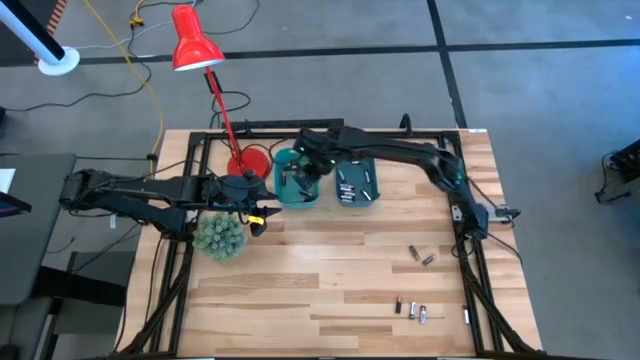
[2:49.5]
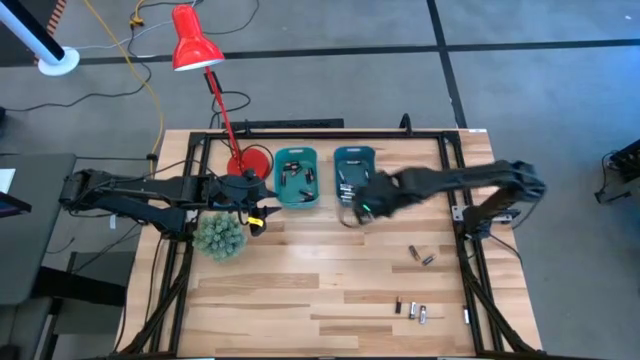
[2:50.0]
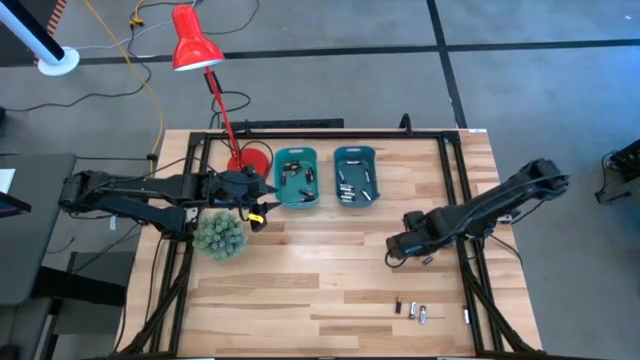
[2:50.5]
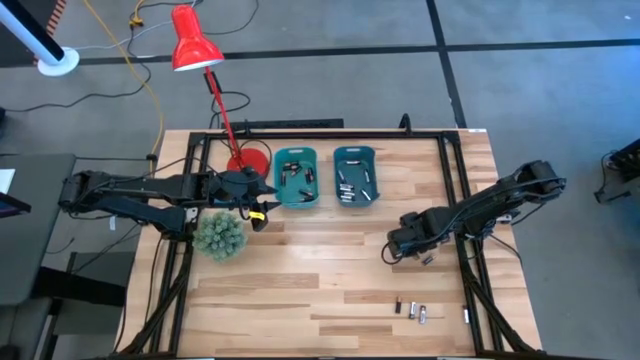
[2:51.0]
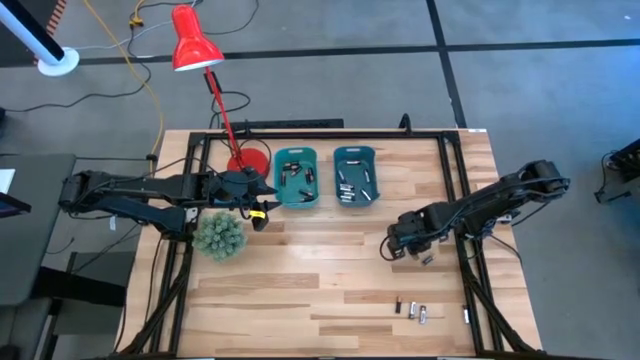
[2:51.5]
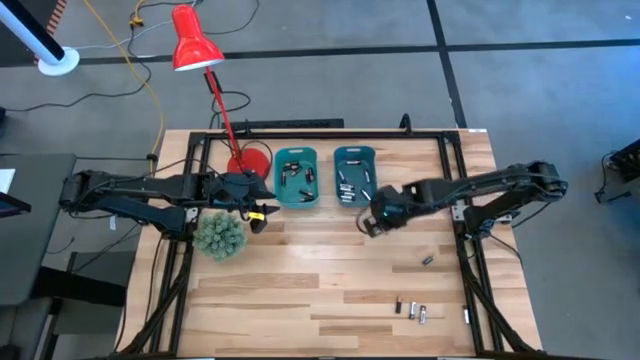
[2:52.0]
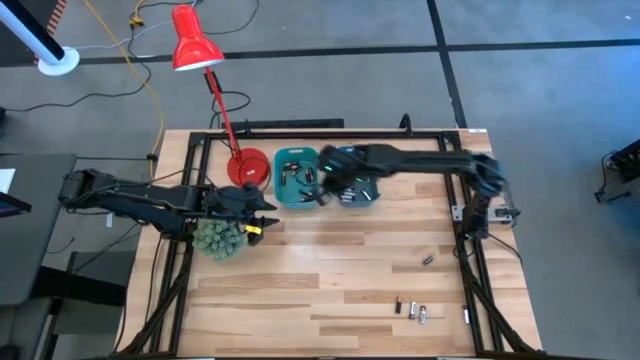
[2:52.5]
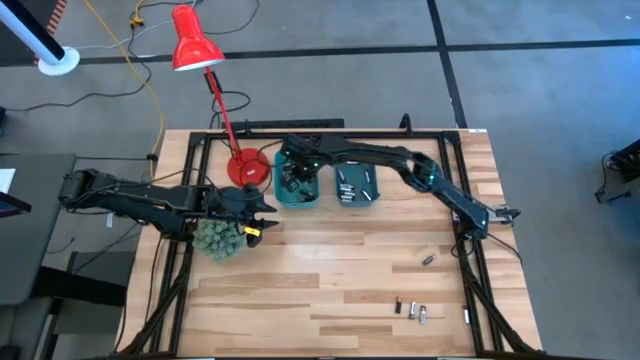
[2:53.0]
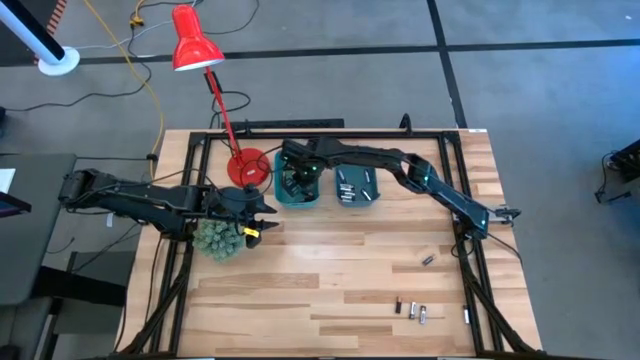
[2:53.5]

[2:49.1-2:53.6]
Task: Sort batteries
Put the black battery into the green bin

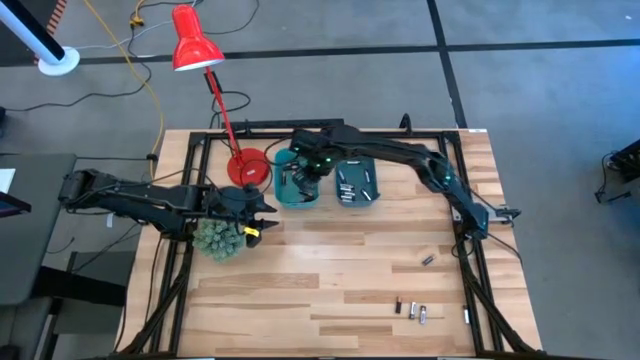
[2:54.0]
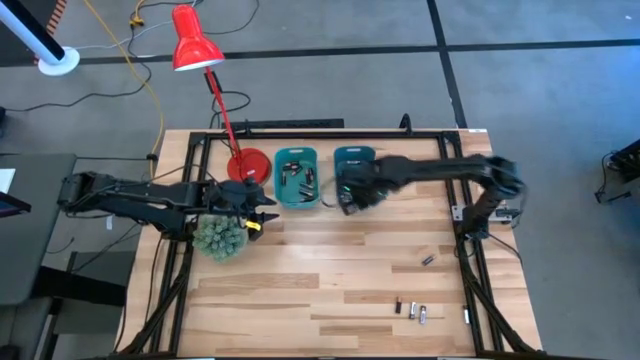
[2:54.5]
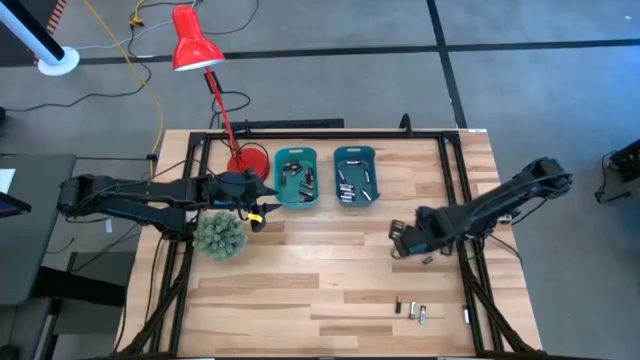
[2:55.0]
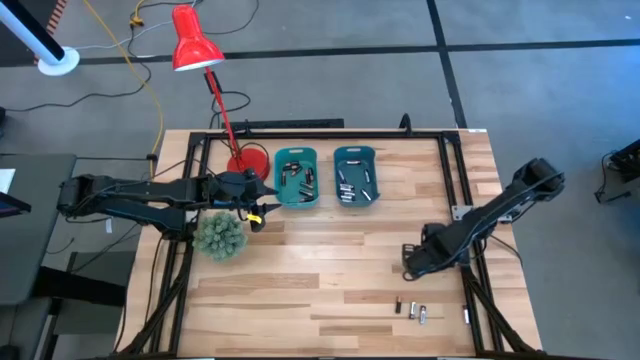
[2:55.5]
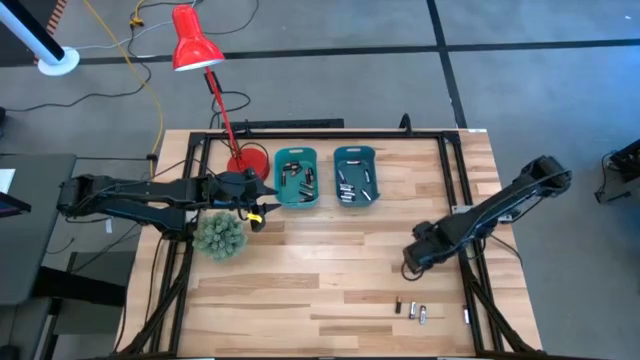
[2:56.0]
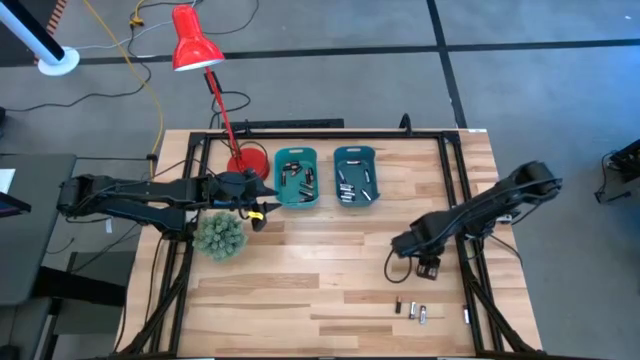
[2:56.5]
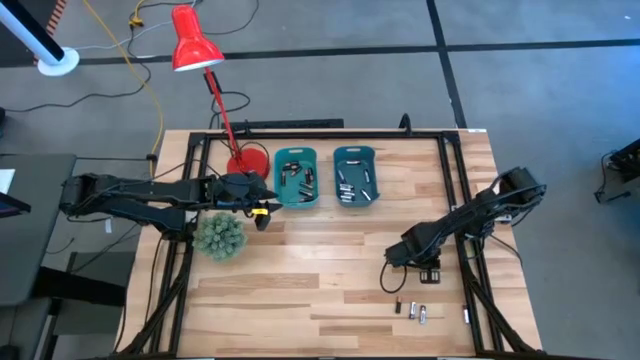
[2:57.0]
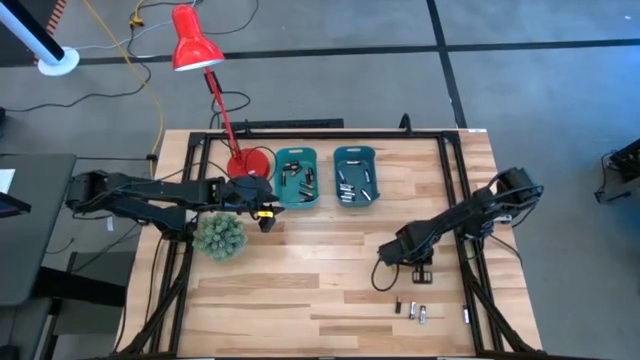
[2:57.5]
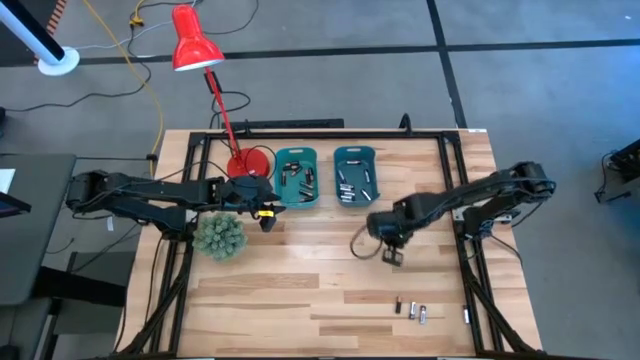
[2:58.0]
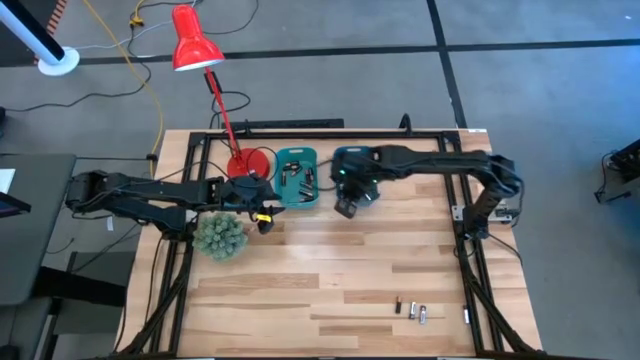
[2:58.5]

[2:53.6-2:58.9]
Put the black battery into the green bin

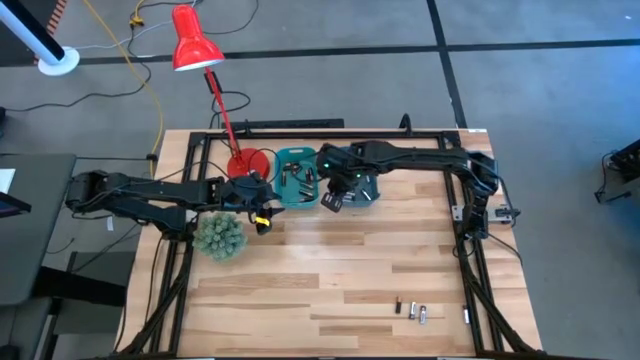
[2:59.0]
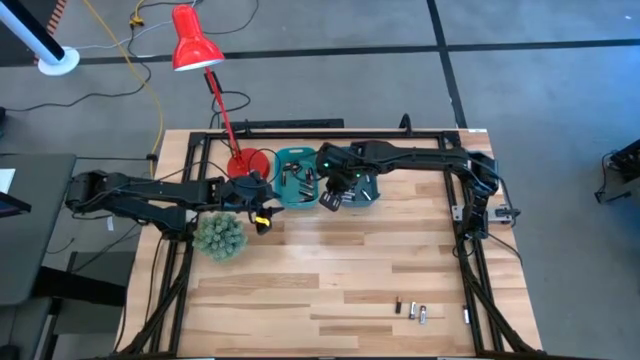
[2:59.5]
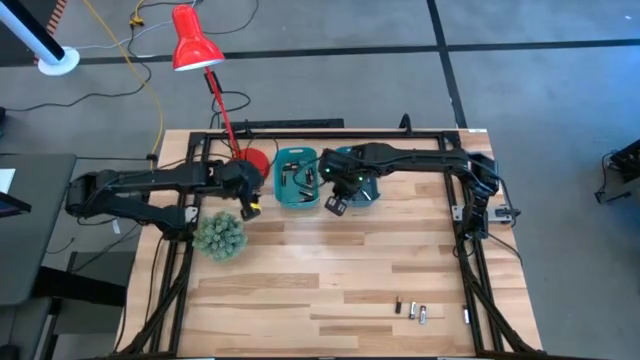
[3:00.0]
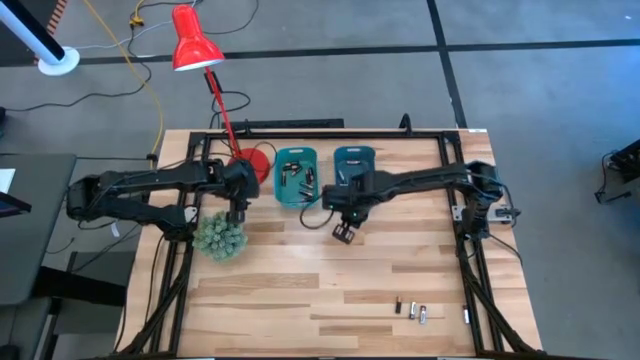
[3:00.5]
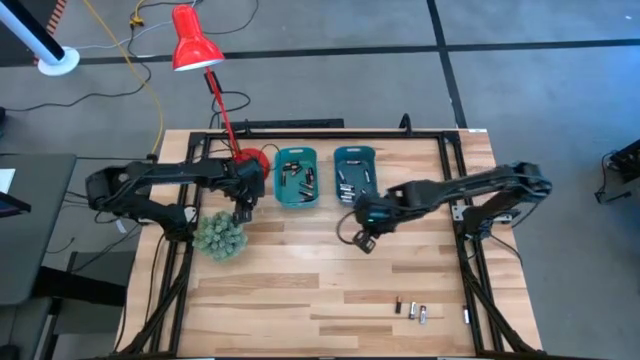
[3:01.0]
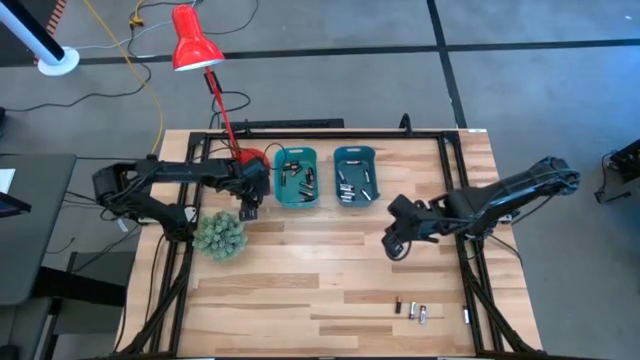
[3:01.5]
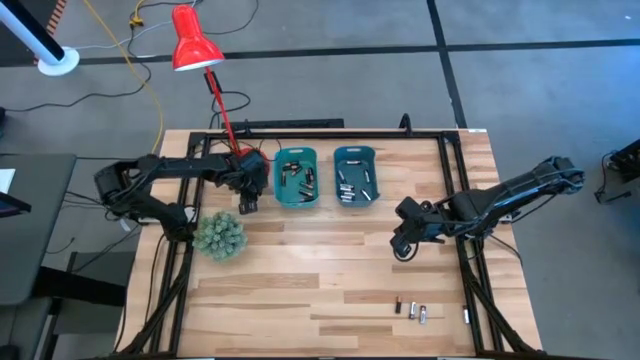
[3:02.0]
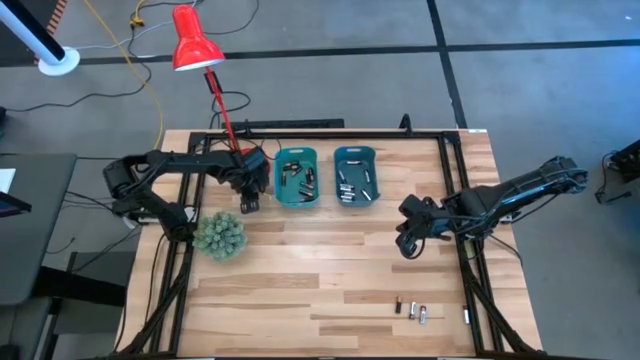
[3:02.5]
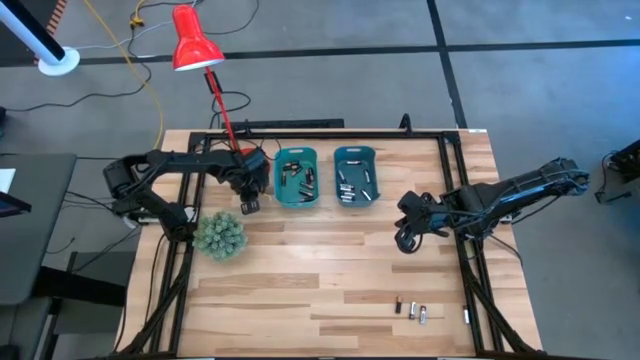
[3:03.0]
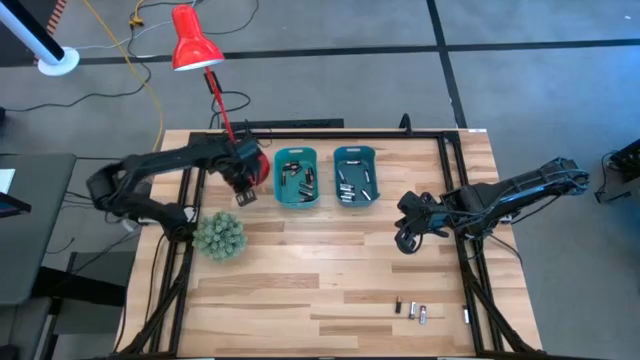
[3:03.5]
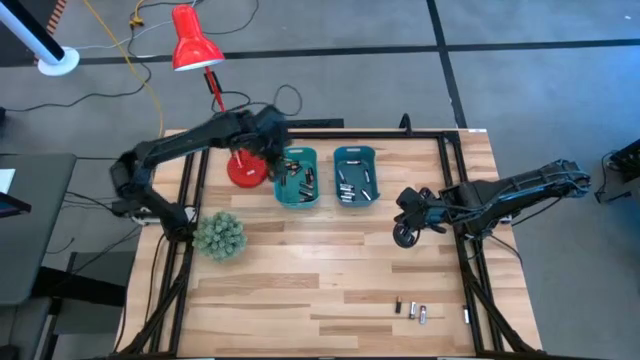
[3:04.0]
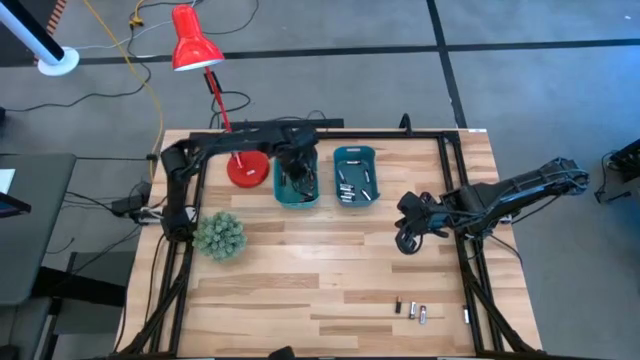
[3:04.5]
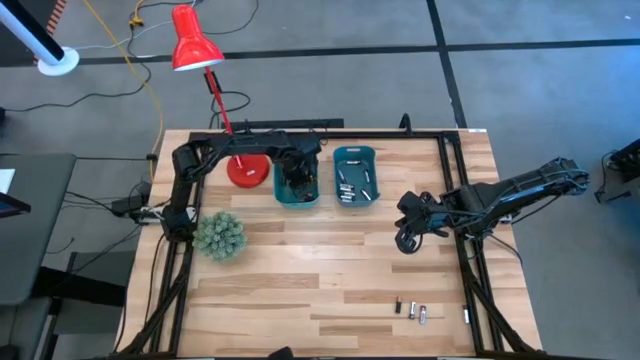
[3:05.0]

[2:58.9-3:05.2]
Put the black battery into the green bin

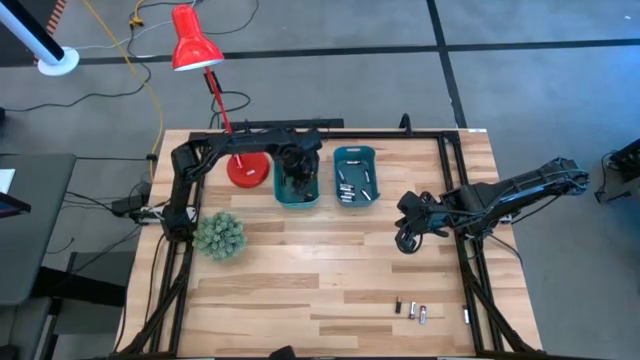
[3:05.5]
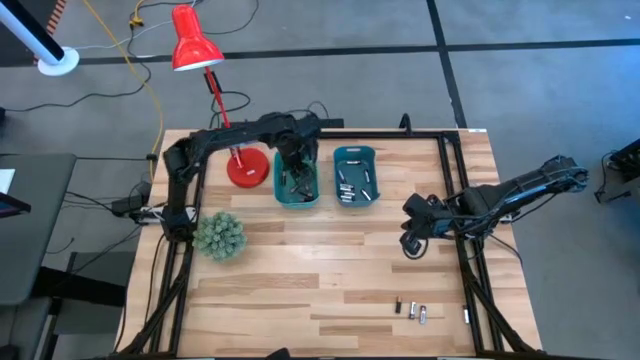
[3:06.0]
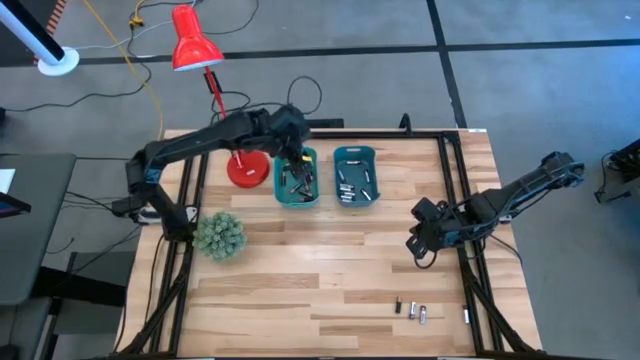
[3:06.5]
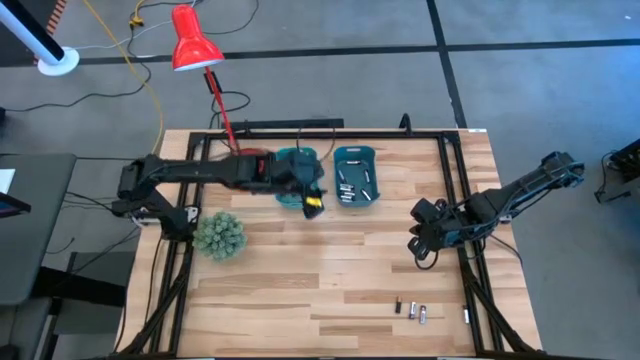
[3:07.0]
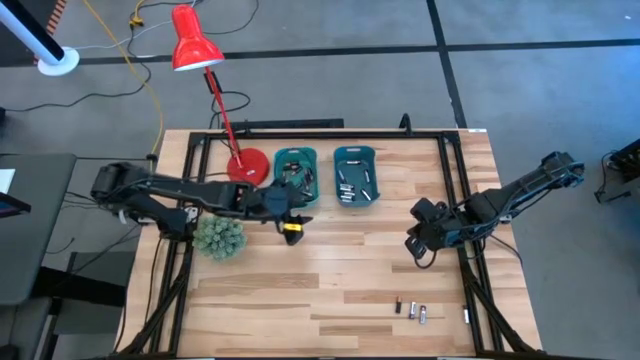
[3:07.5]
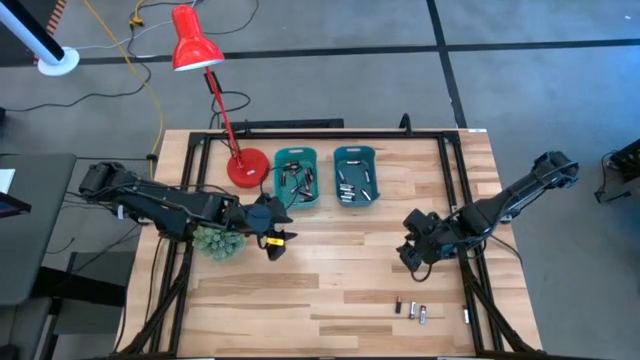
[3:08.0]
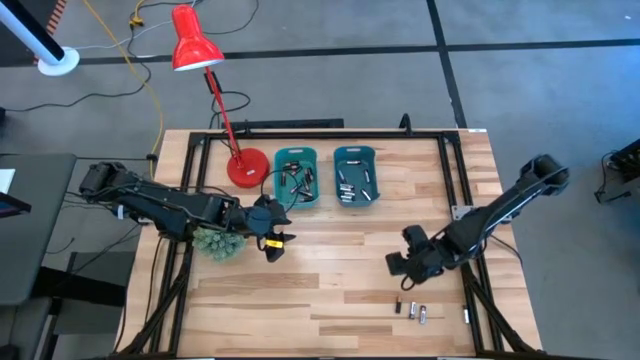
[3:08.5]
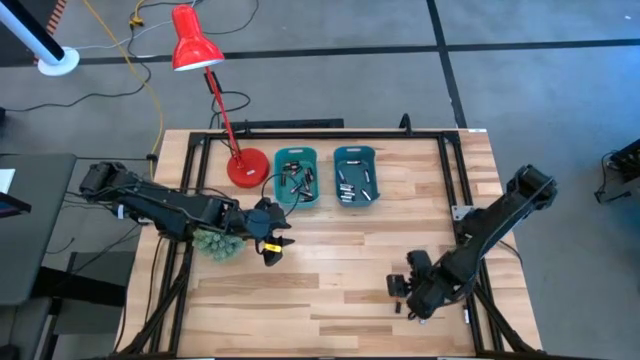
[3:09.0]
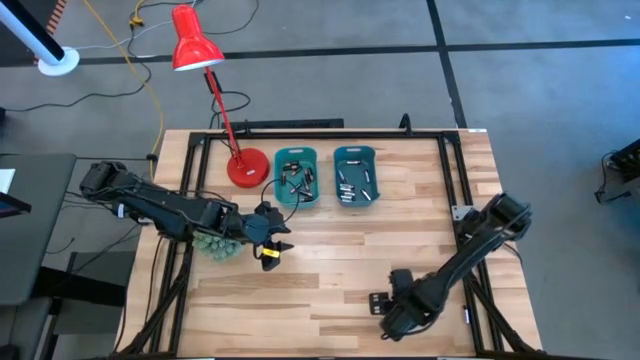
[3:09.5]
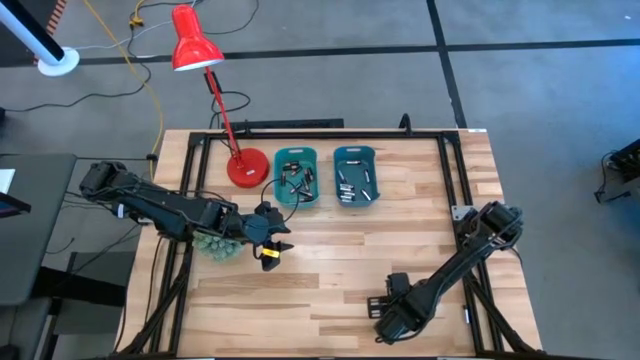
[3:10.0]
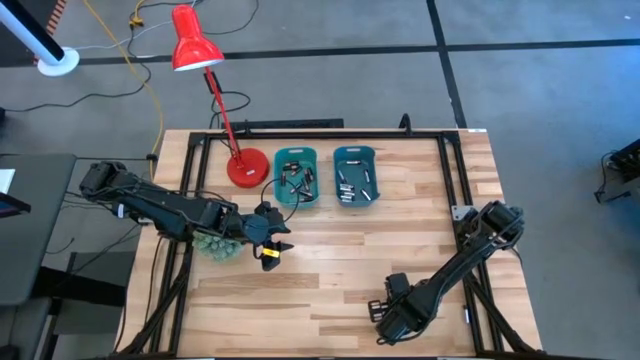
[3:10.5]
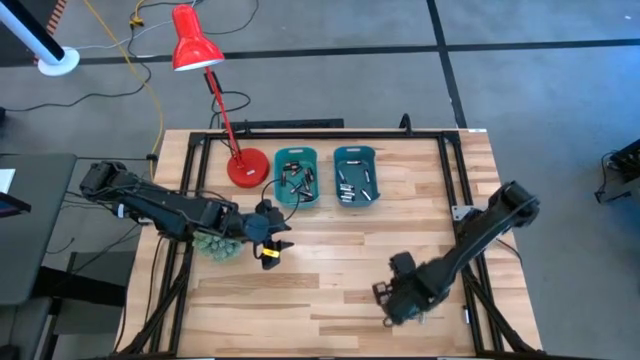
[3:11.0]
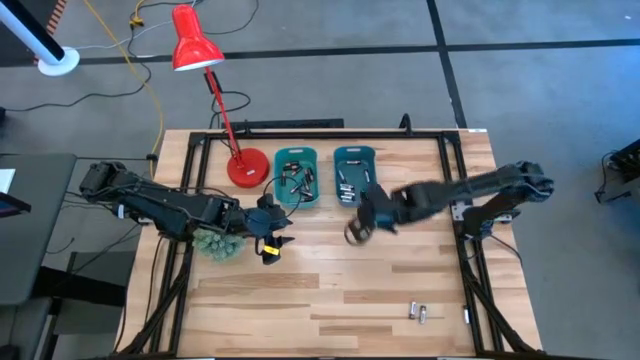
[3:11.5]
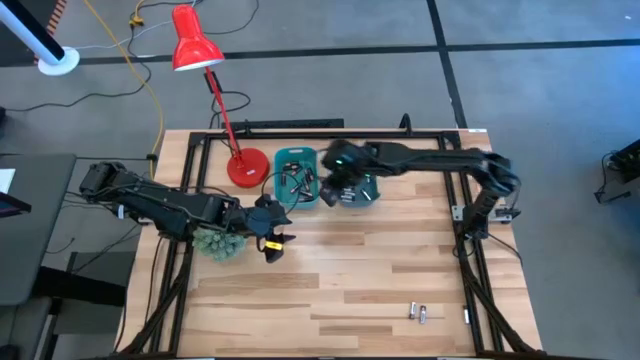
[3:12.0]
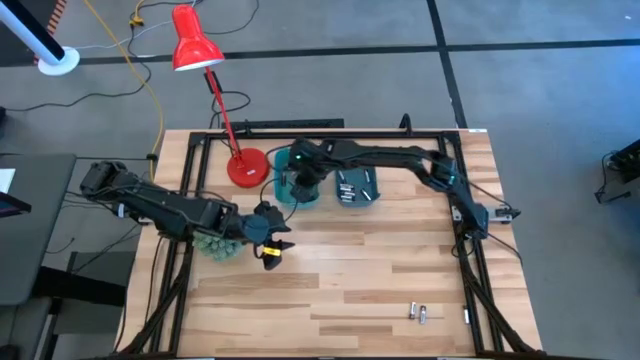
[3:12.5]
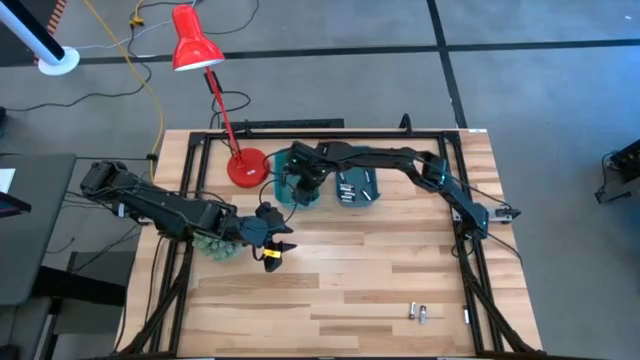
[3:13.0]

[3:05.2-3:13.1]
Put the black battery into the green bin
